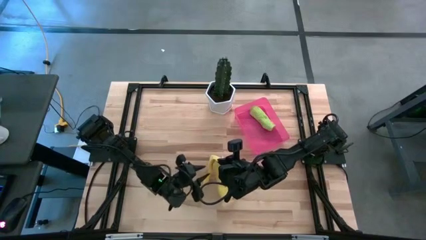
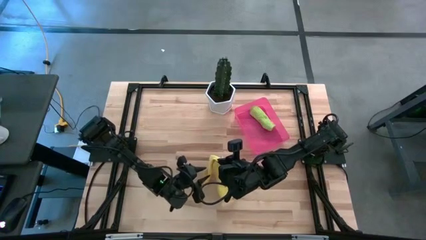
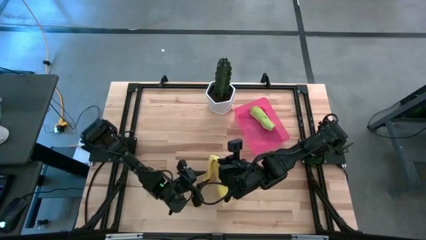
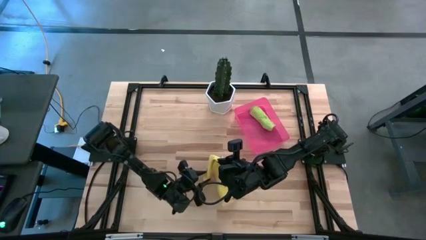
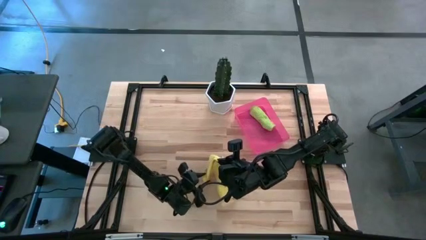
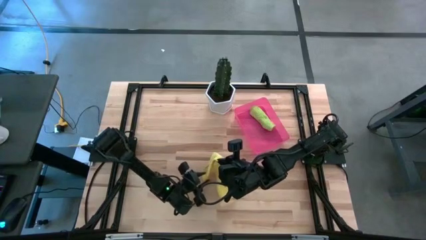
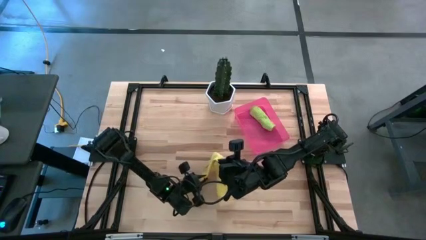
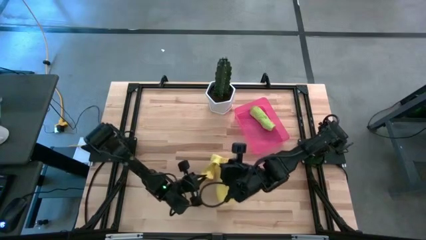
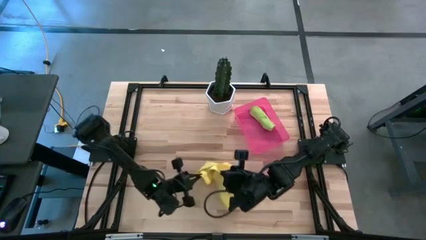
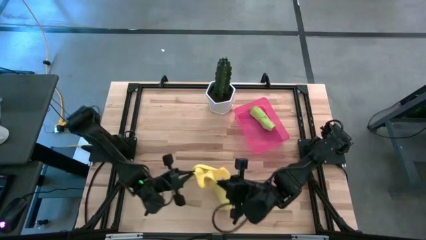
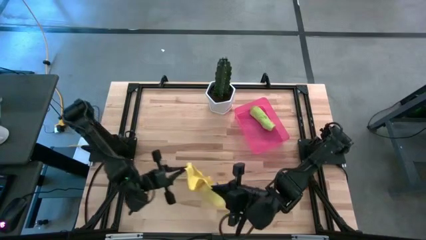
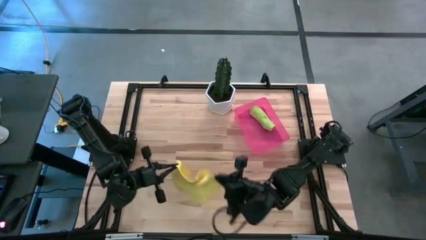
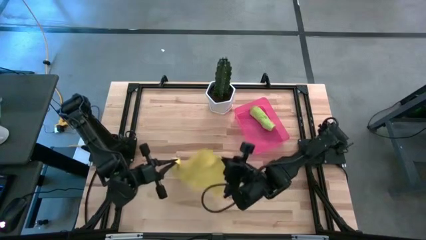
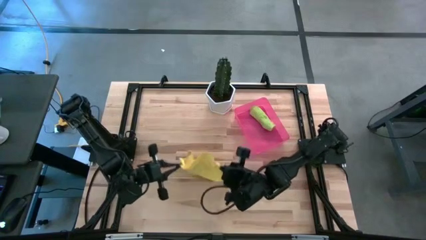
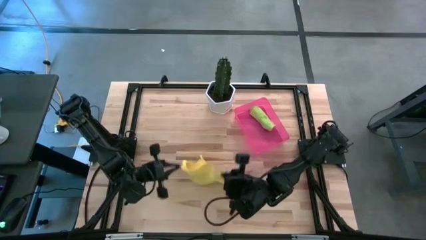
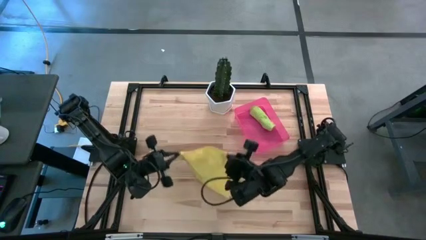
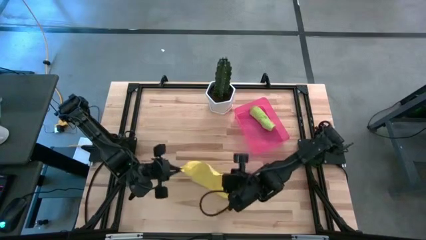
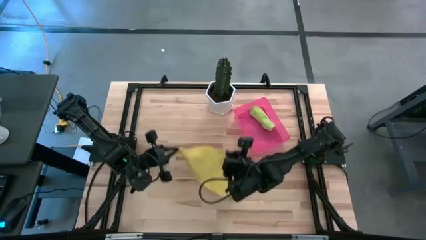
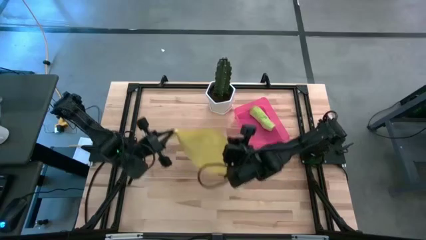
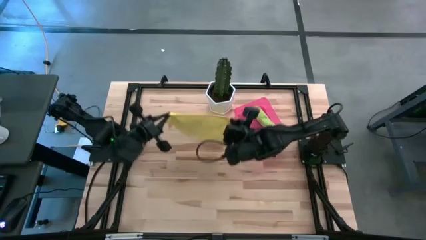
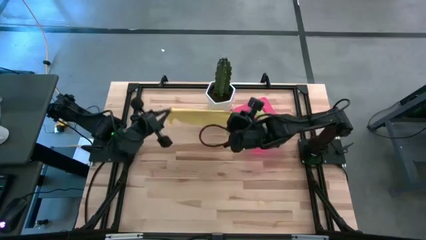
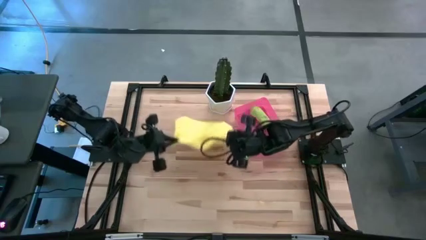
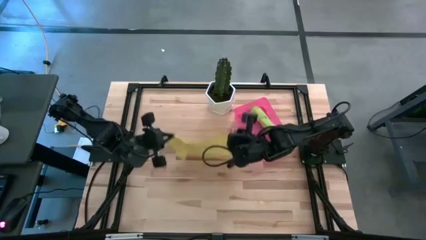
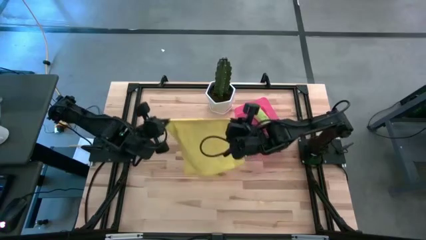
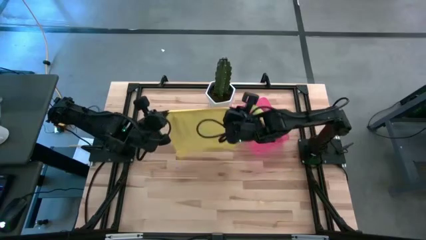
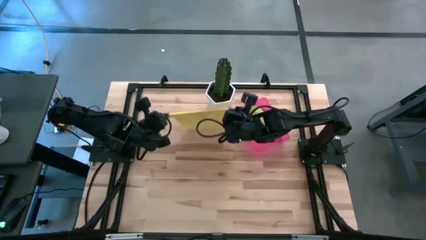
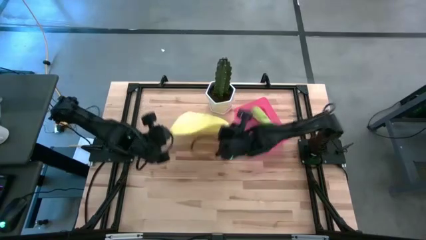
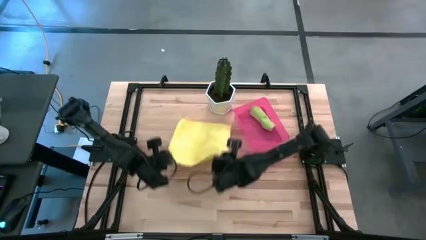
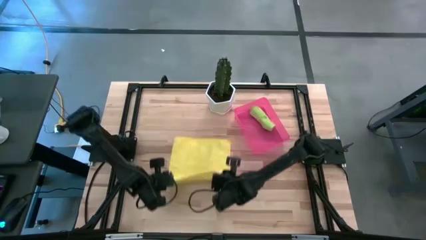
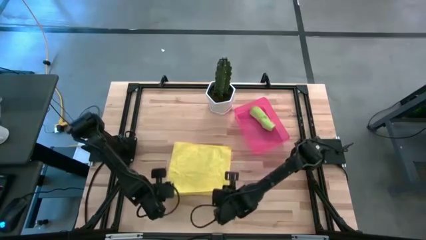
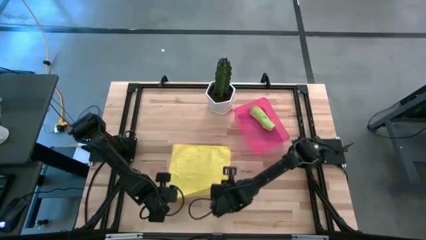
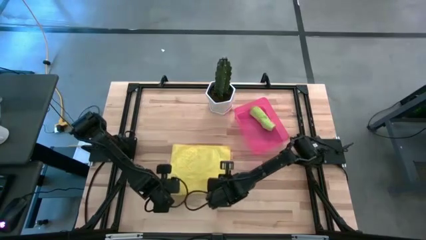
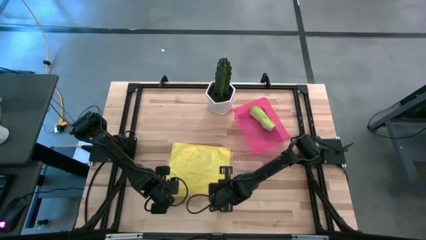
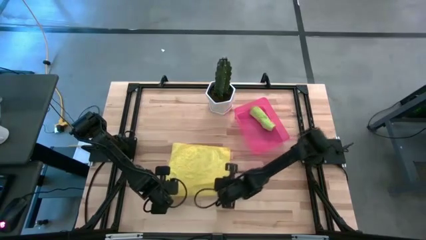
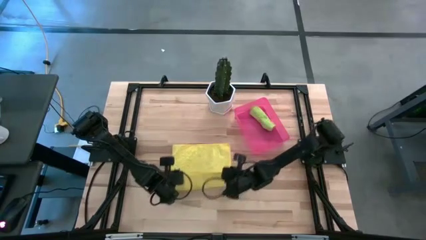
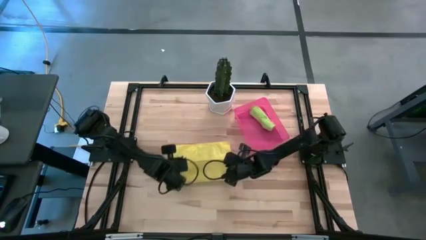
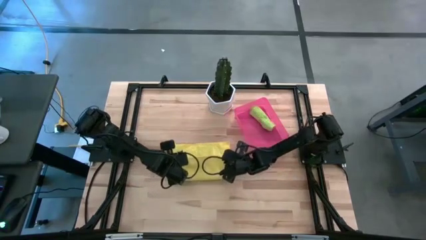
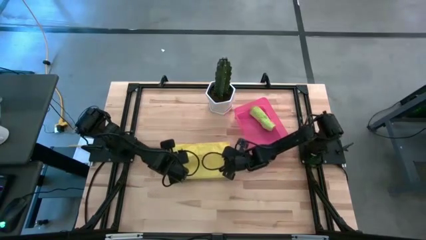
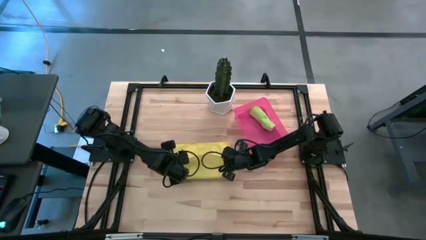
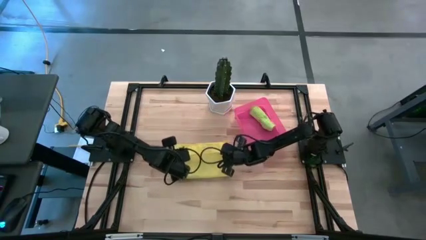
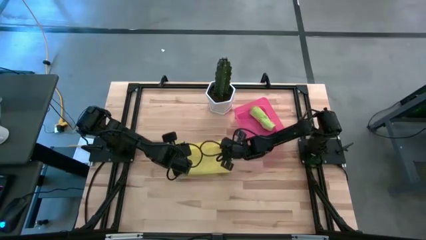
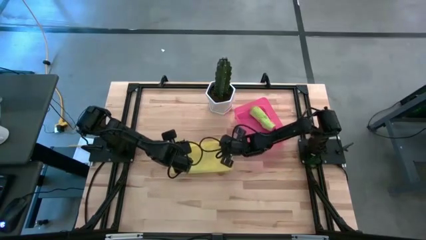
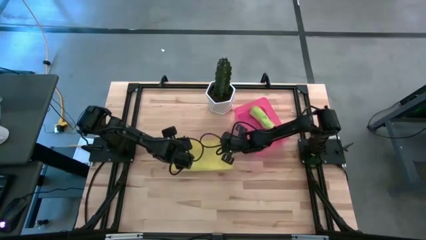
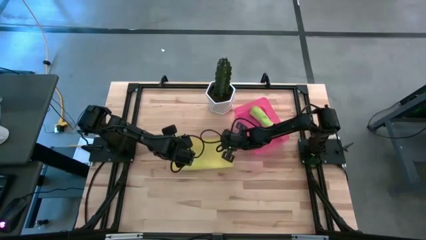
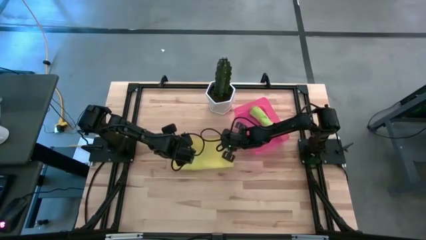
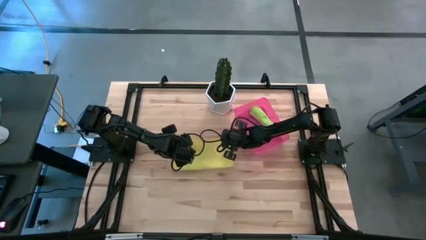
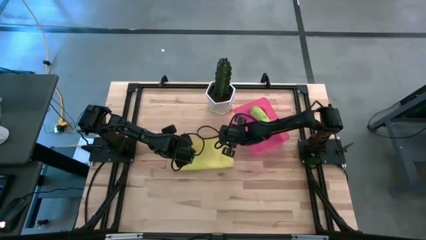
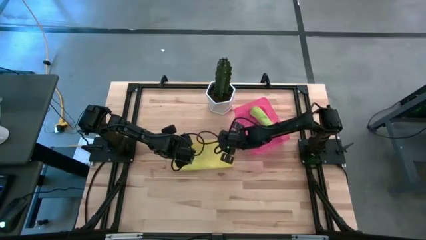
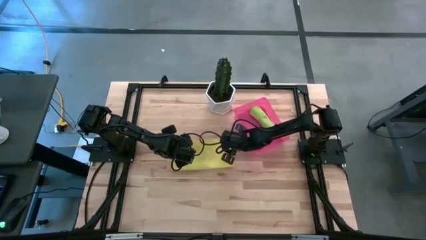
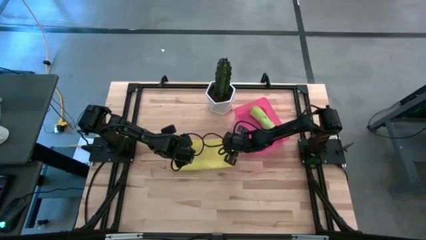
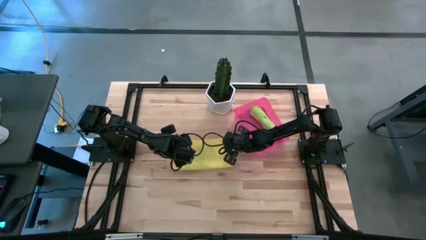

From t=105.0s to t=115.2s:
Task: Roll microfiber towels into tight, uniform cylinder then place into a basket
Fold the yellow towel

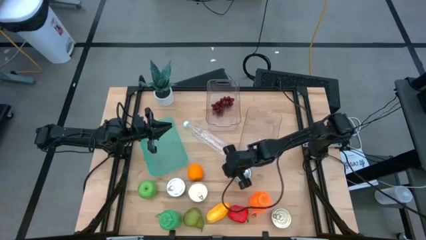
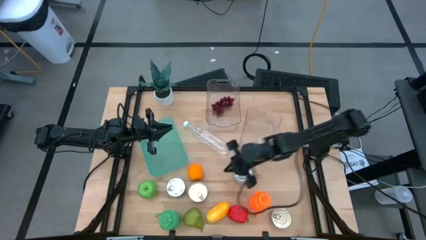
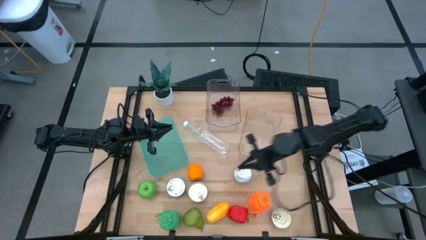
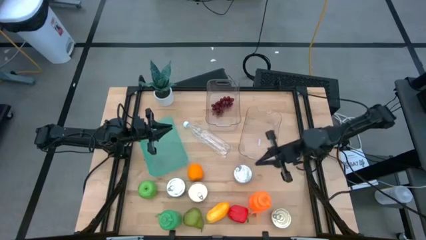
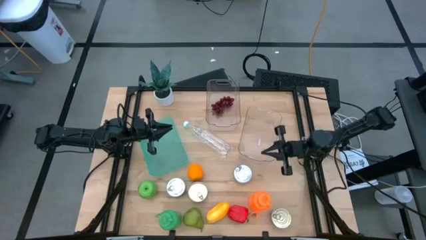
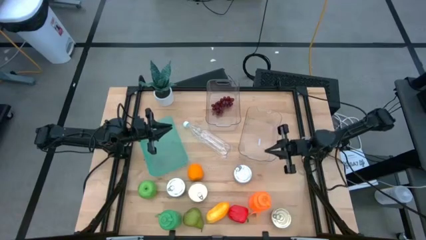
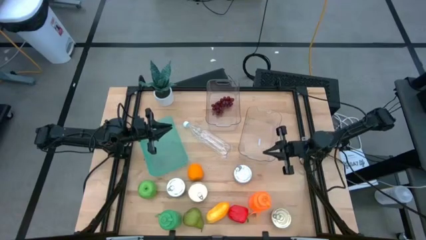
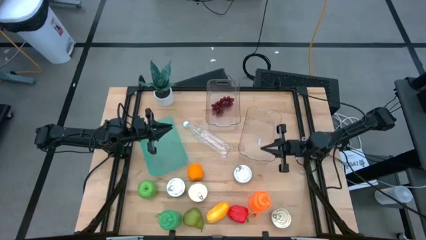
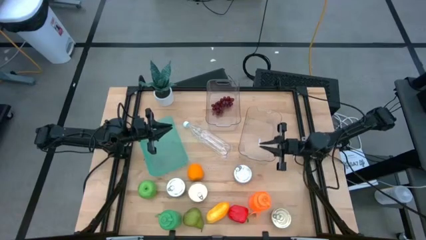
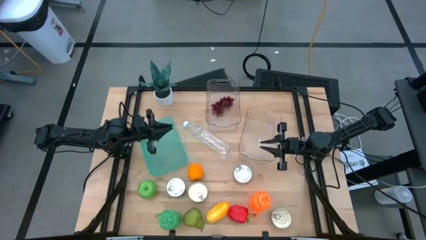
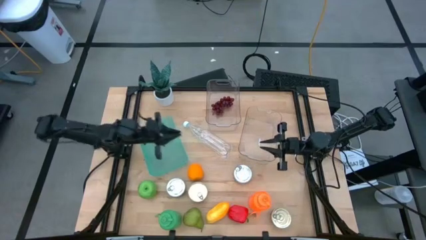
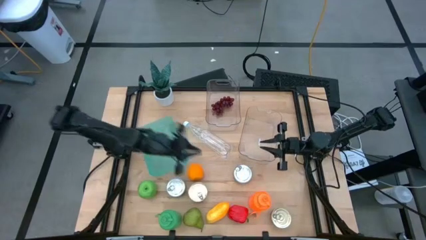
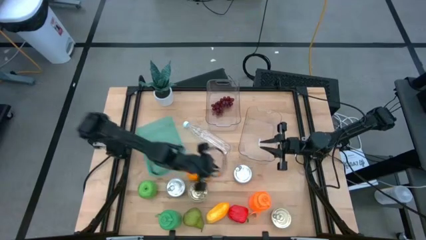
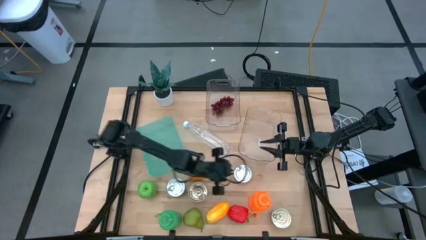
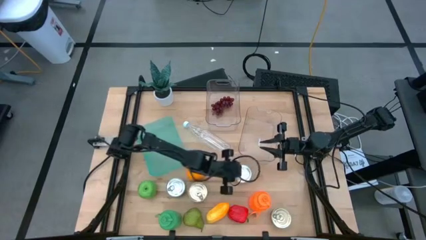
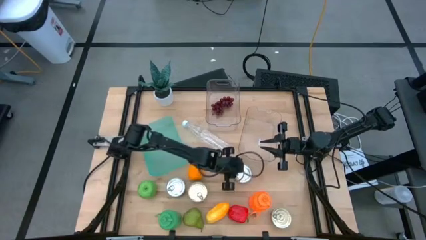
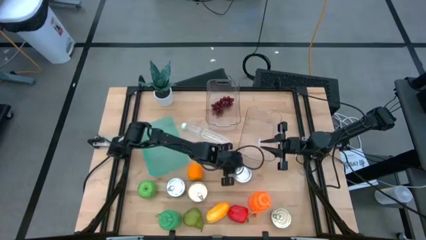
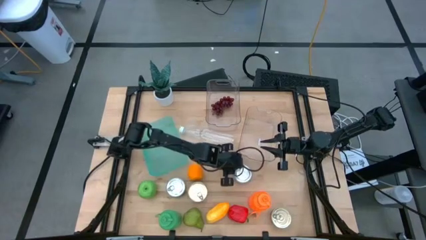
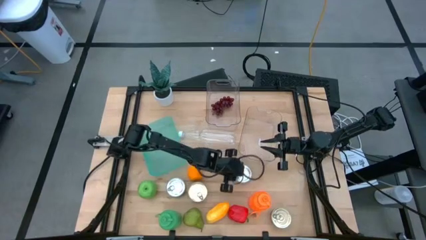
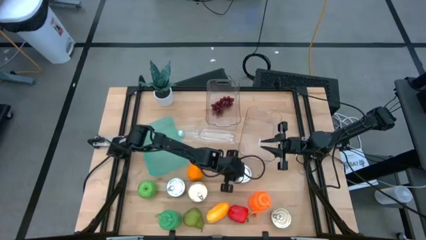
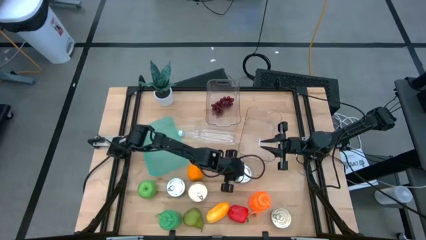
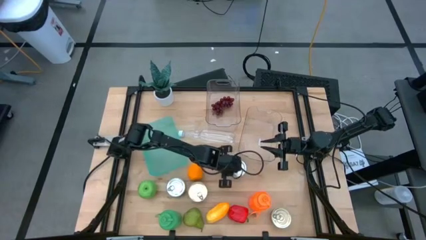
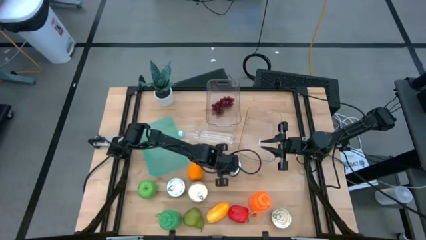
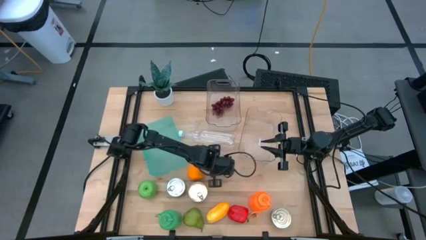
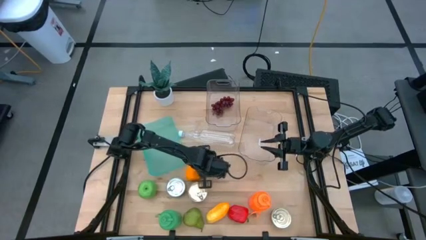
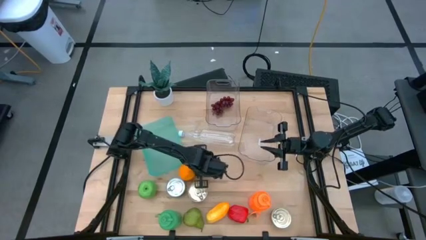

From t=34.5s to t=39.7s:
Task: Pick & Place Food Item
Adjust the blue and pink tuna can on the table
